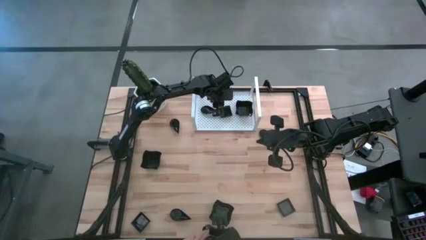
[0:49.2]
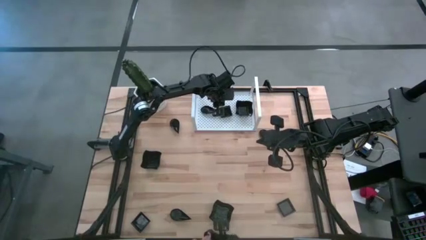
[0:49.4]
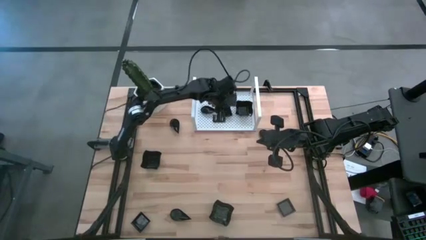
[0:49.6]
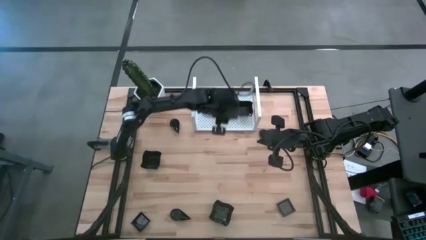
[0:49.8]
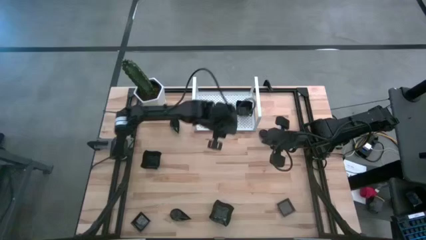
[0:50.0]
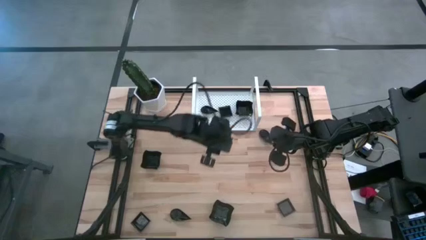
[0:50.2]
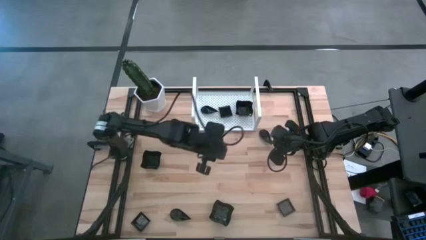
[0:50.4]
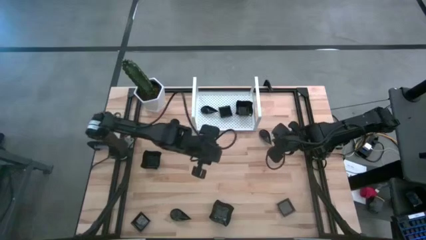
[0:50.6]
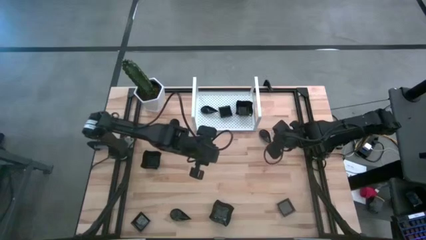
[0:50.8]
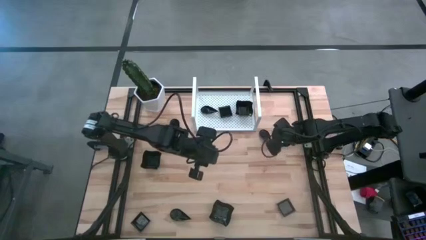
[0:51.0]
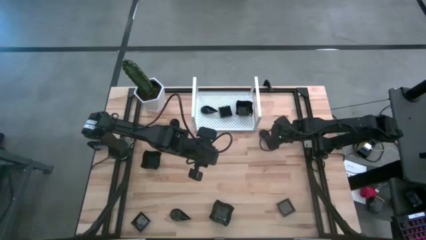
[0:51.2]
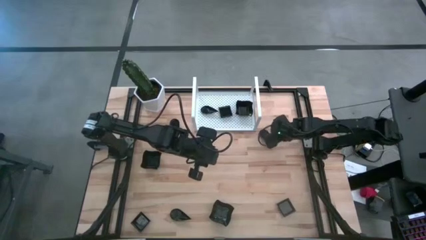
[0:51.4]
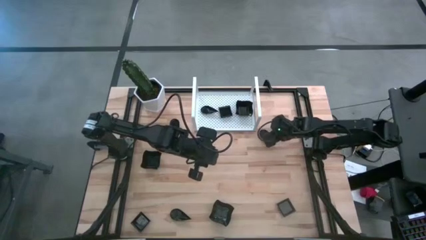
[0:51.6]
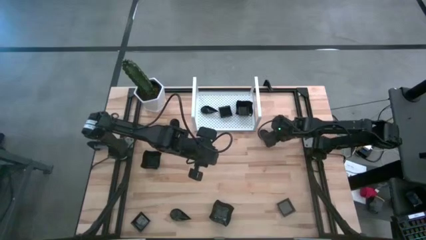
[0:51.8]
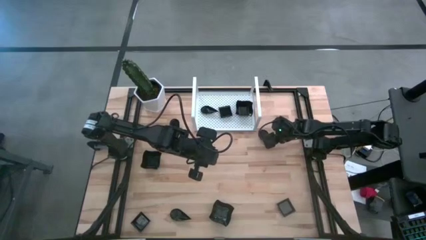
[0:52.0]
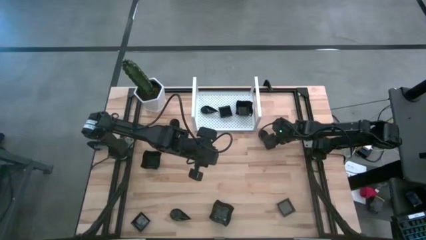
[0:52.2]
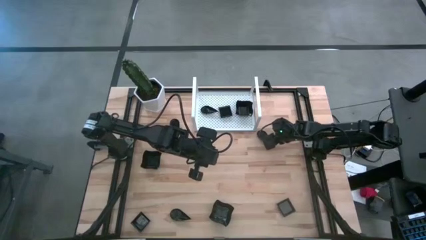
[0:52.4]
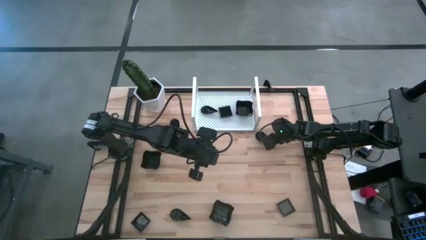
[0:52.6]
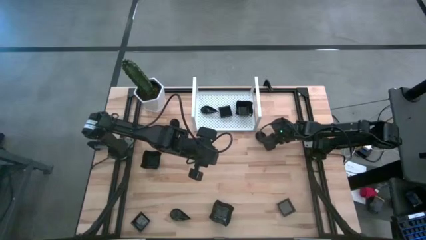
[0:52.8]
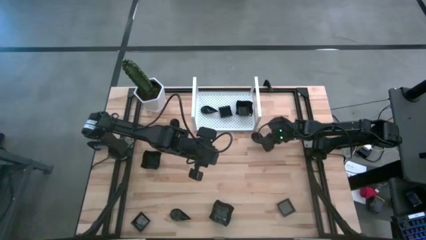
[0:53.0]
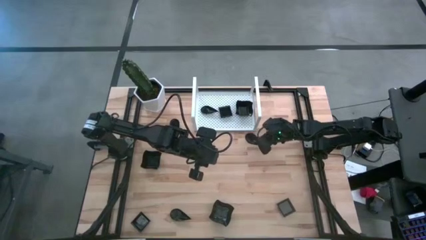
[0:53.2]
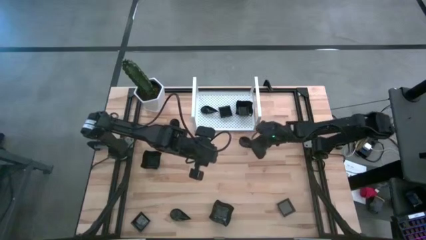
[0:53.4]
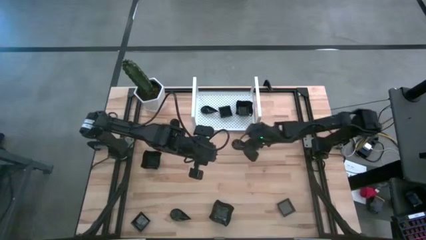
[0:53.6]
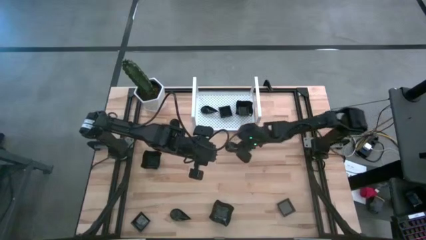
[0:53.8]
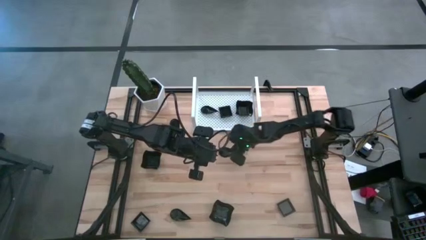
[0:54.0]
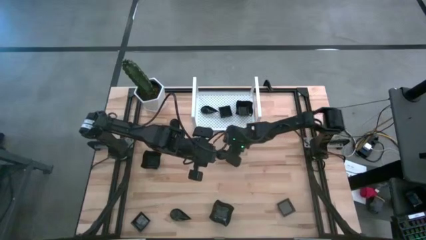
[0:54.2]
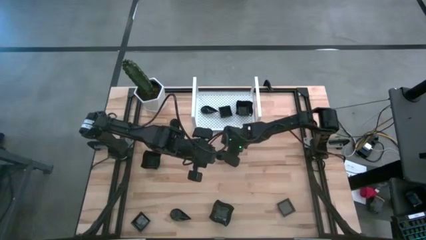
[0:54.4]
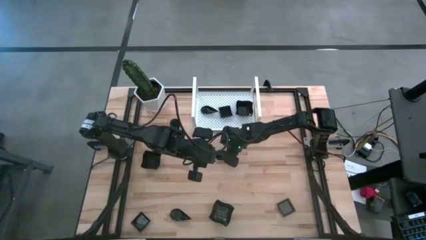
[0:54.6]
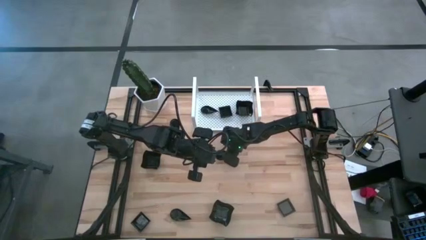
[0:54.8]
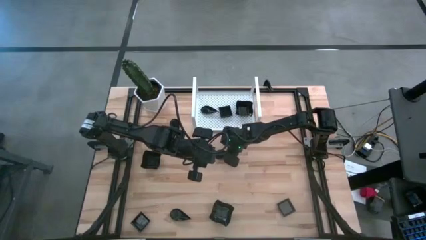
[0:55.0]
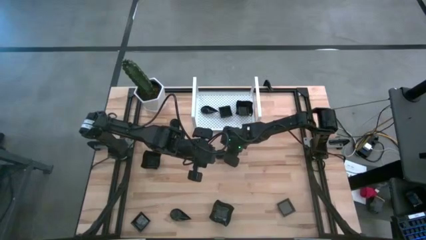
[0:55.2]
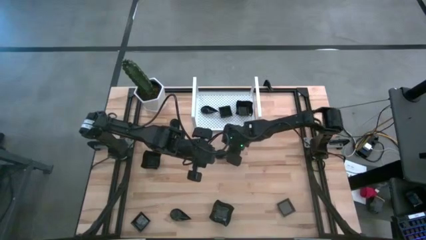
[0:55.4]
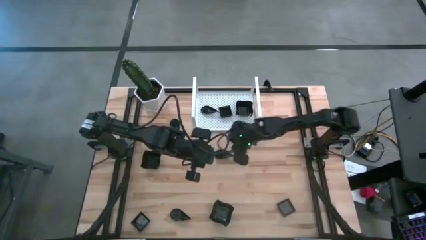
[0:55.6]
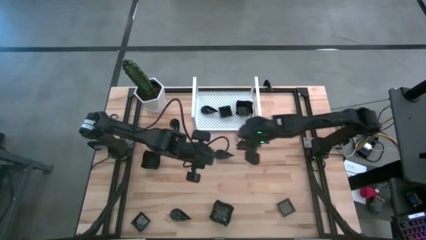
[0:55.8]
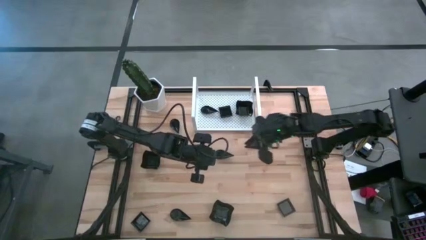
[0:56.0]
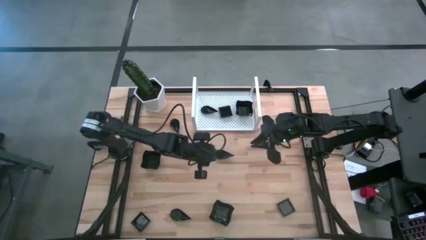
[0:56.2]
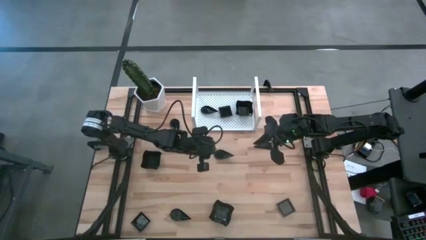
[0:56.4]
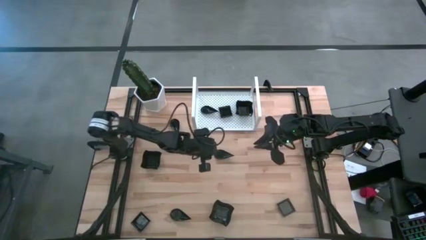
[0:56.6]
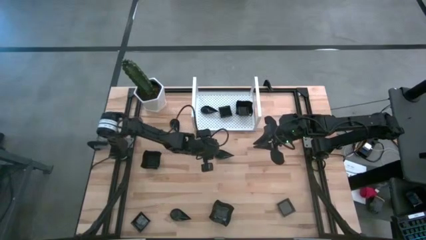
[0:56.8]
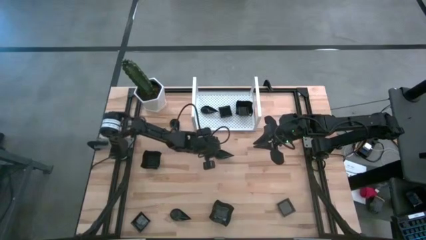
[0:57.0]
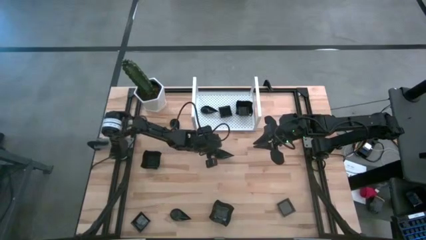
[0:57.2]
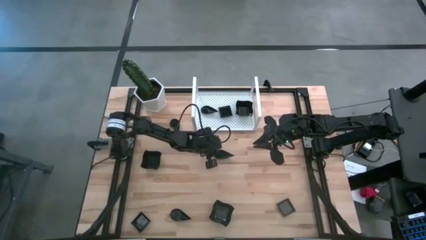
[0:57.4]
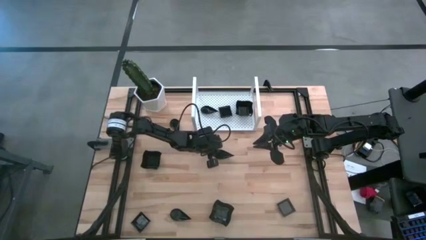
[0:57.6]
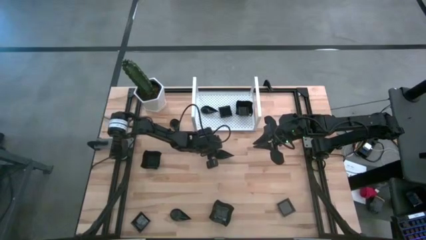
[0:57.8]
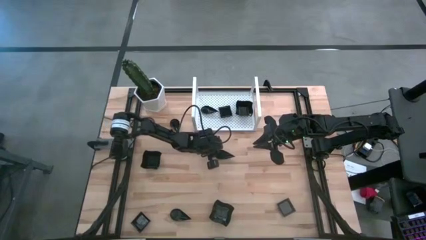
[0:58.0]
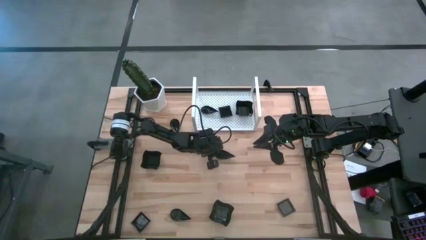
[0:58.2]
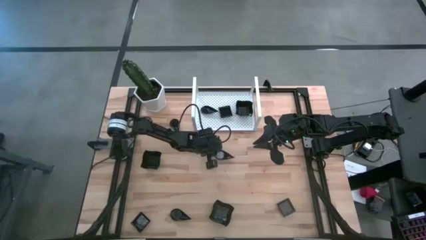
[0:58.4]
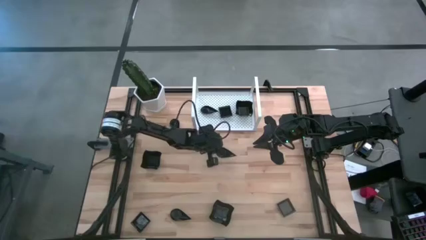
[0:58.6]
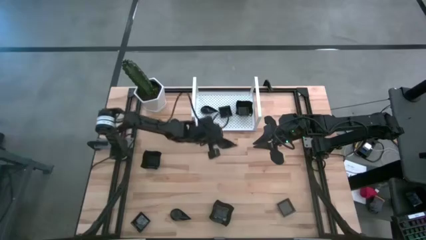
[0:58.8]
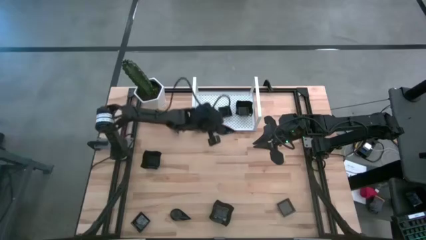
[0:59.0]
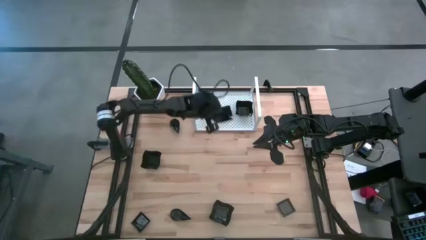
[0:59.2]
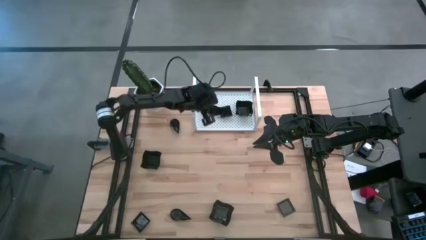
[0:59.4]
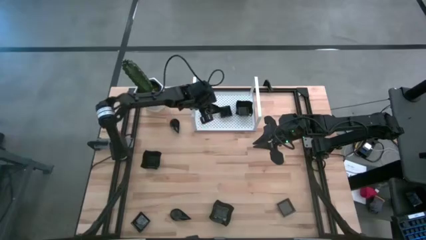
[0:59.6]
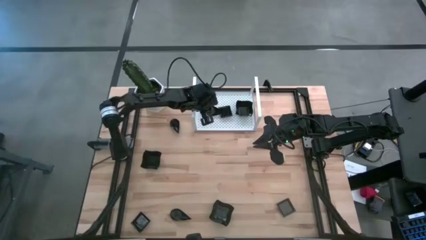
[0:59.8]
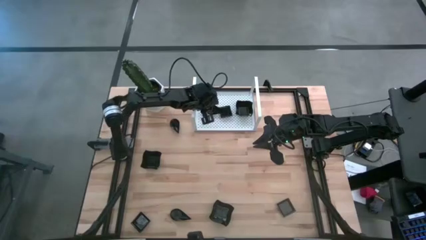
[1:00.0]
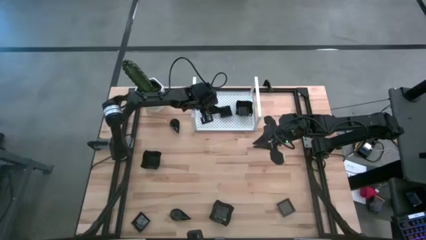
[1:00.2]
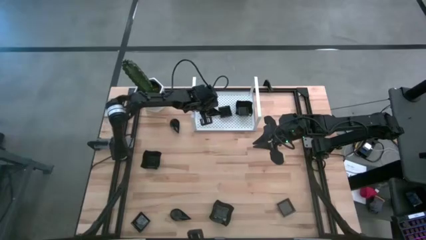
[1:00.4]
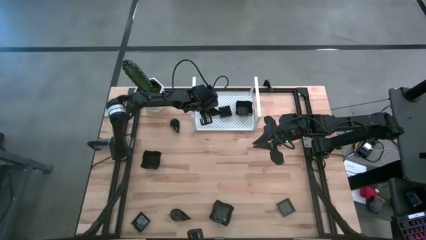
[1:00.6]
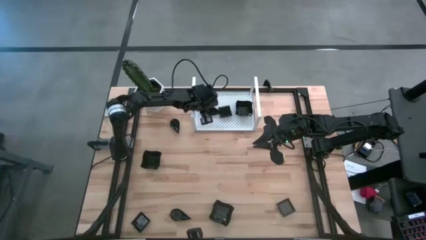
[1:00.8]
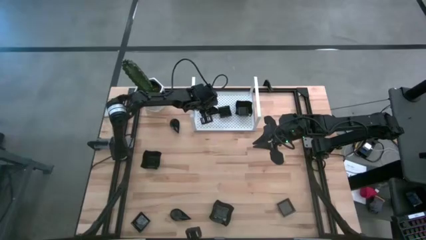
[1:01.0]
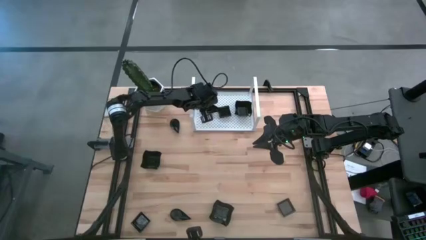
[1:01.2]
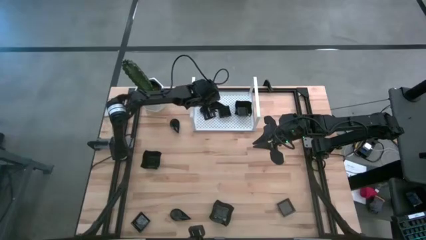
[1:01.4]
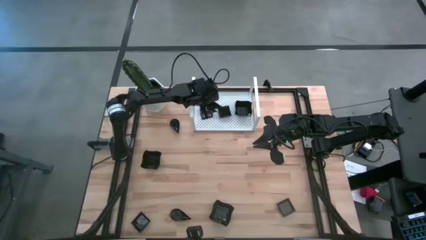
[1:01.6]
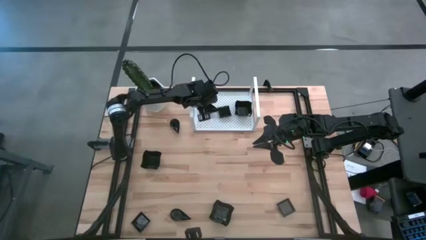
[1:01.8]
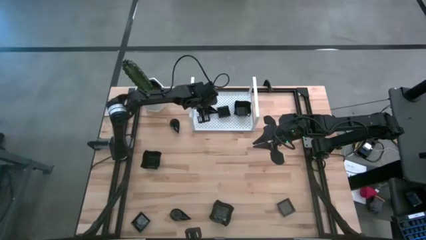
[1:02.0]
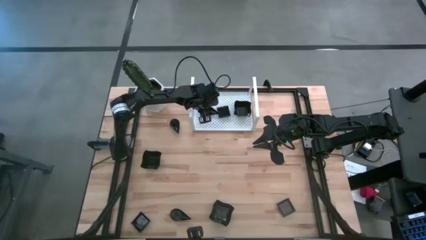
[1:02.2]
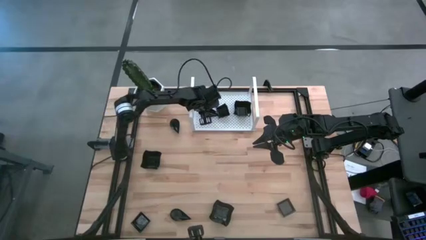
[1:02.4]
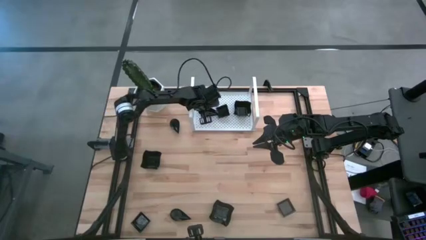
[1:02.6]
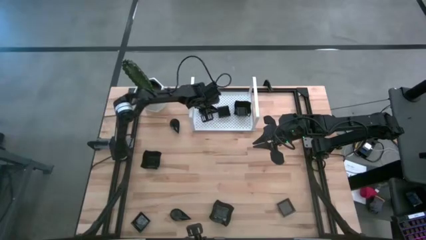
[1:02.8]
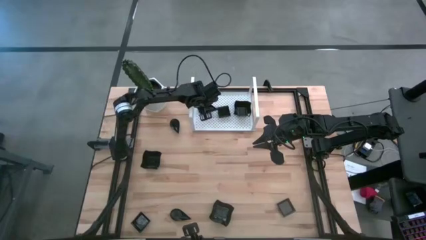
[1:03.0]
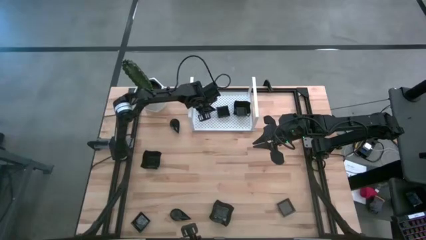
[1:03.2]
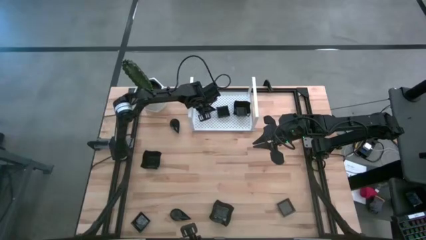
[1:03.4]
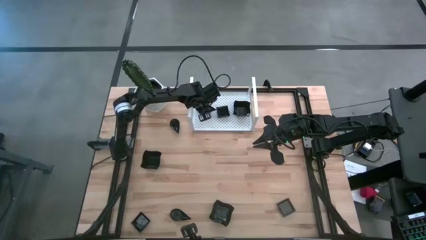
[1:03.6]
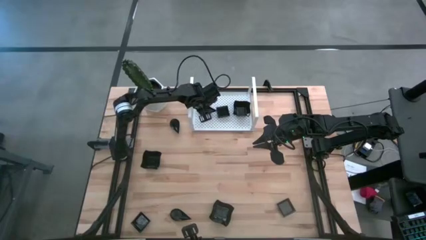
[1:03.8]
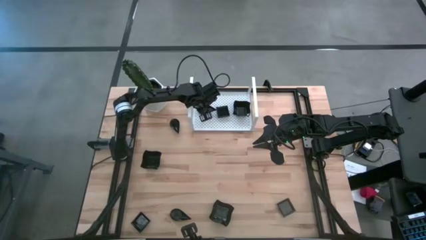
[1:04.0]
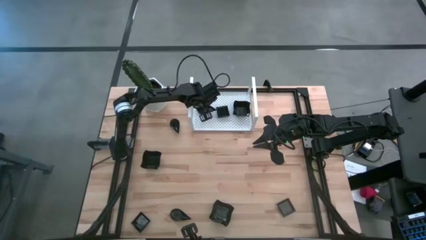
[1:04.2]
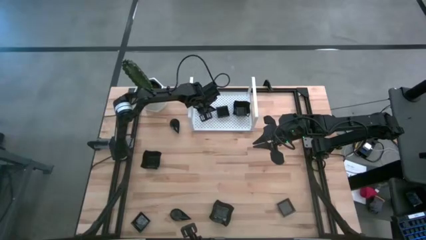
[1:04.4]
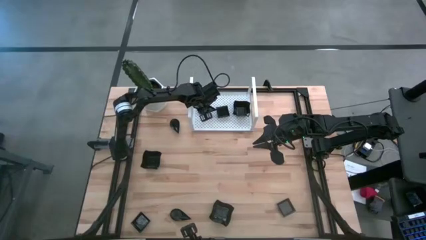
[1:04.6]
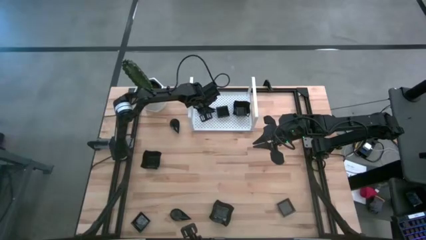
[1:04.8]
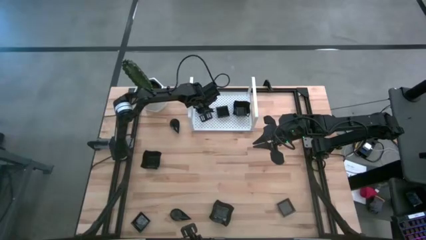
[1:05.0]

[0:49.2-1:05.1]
Task: Pick & Place Mini shaped plates
Stack the black drop-shaped plate on top of the black drop-shaped plate on the shelf
